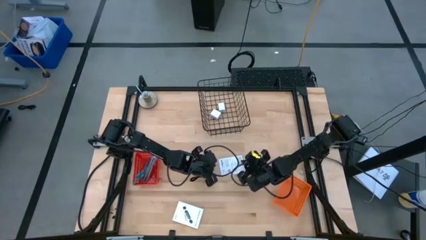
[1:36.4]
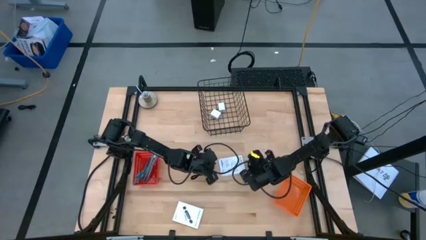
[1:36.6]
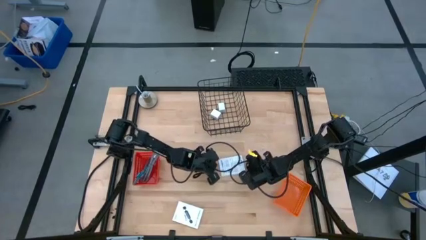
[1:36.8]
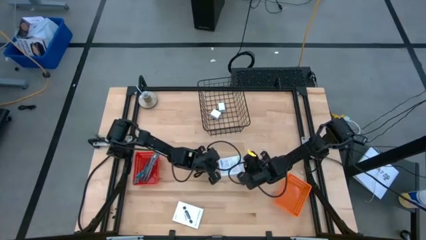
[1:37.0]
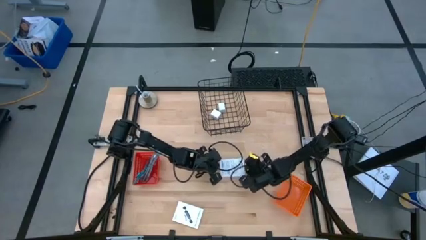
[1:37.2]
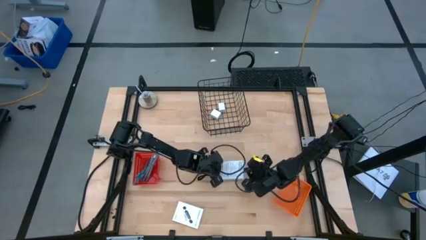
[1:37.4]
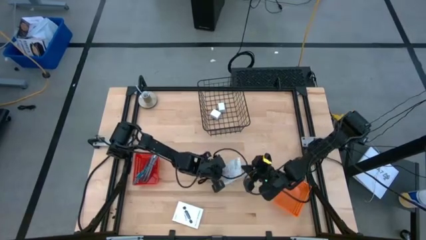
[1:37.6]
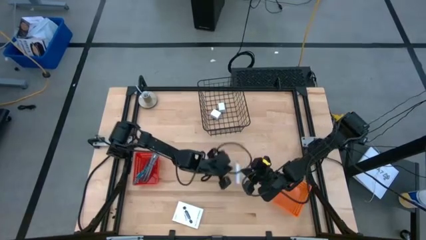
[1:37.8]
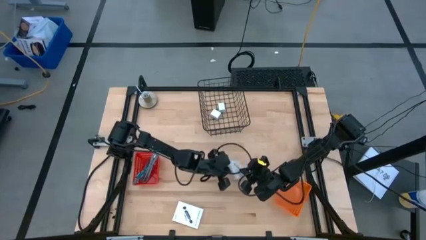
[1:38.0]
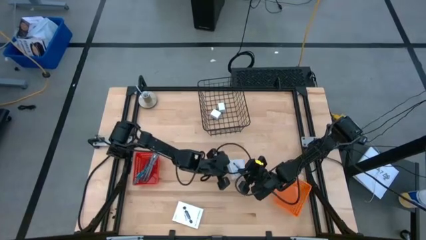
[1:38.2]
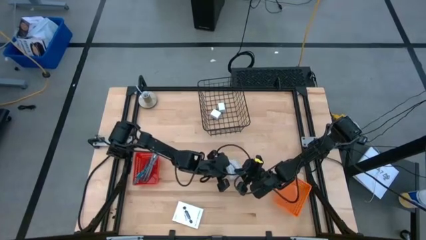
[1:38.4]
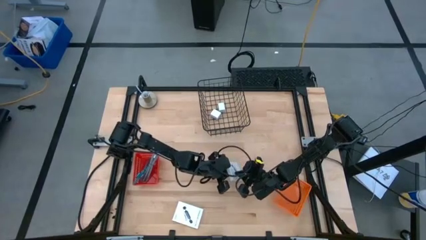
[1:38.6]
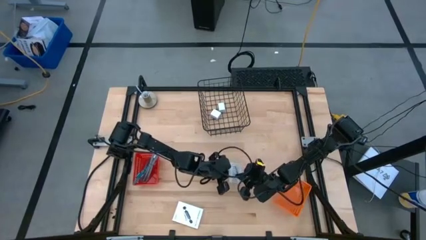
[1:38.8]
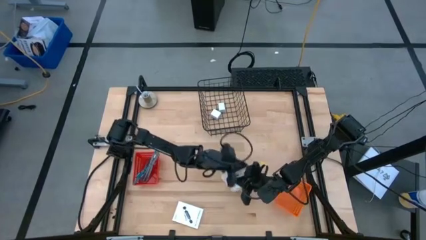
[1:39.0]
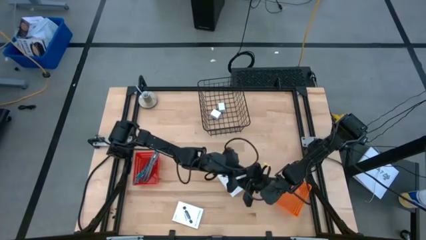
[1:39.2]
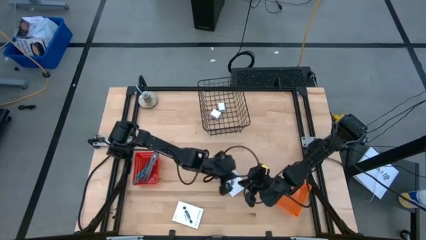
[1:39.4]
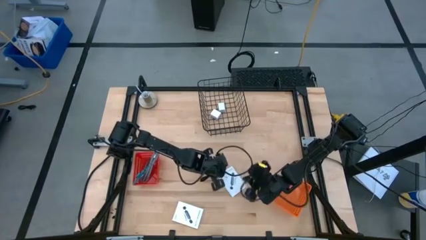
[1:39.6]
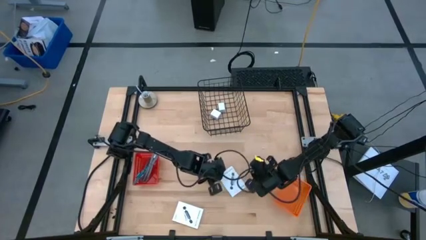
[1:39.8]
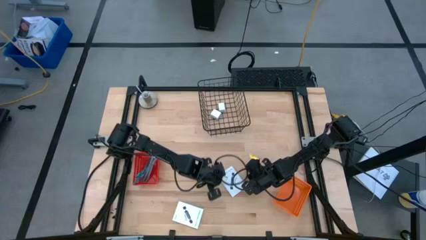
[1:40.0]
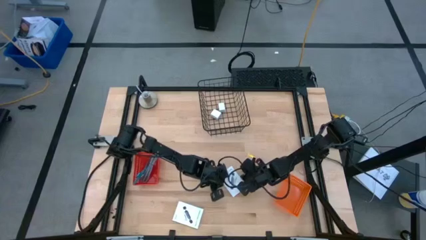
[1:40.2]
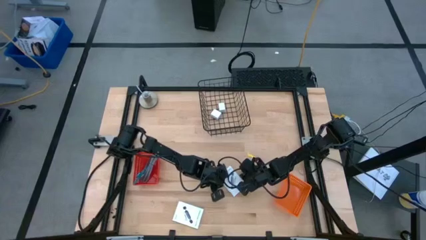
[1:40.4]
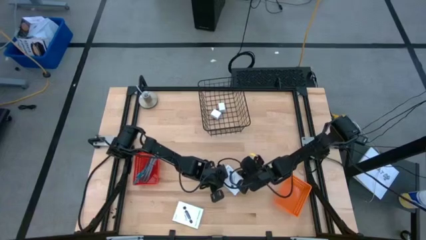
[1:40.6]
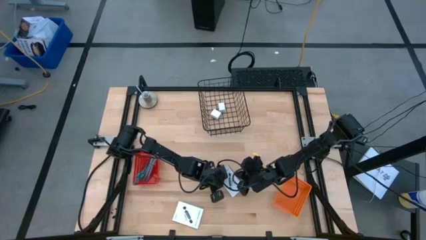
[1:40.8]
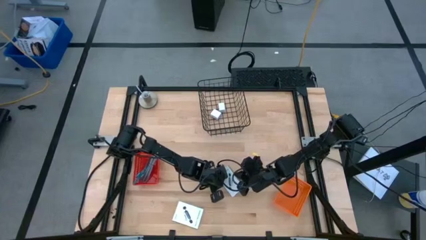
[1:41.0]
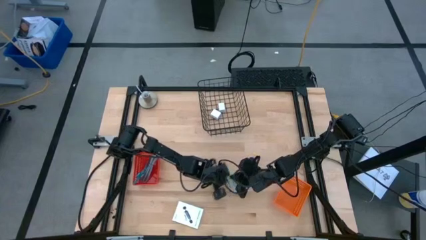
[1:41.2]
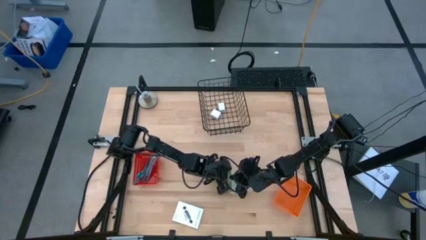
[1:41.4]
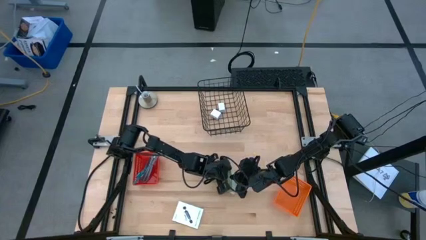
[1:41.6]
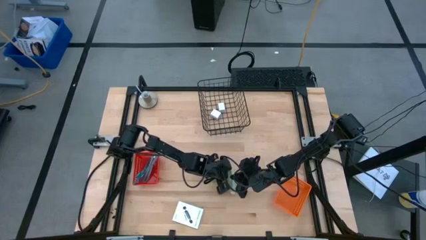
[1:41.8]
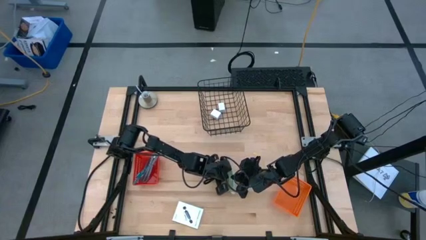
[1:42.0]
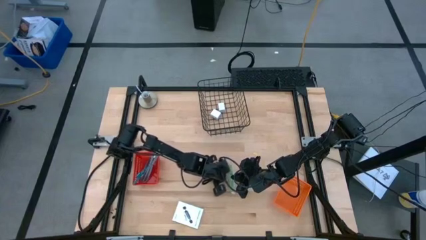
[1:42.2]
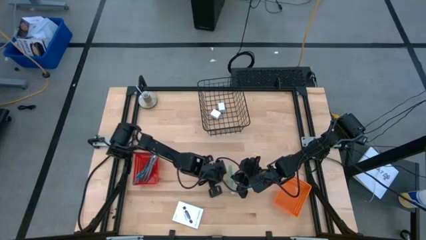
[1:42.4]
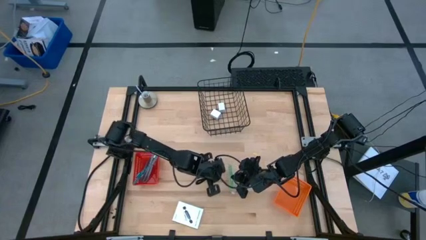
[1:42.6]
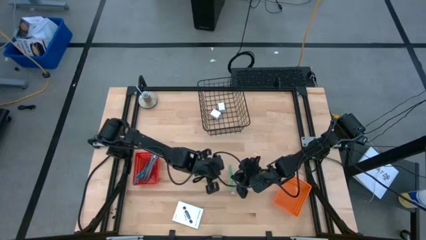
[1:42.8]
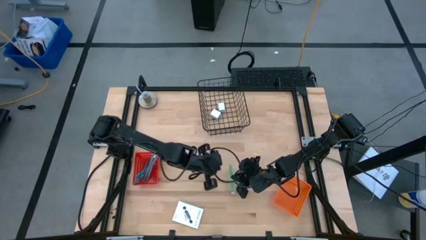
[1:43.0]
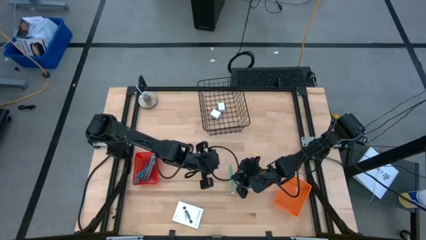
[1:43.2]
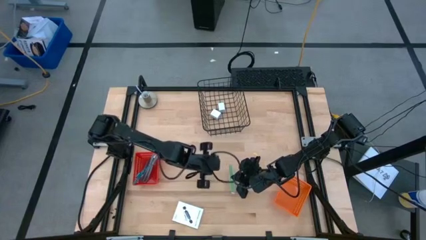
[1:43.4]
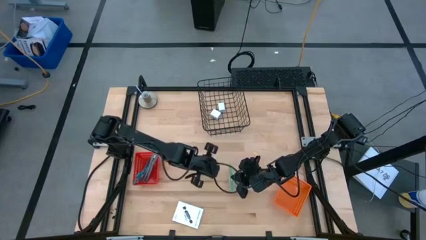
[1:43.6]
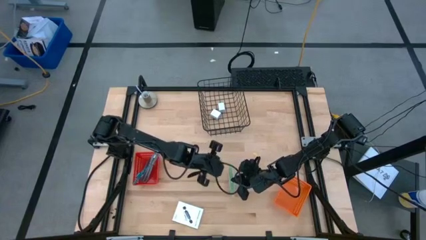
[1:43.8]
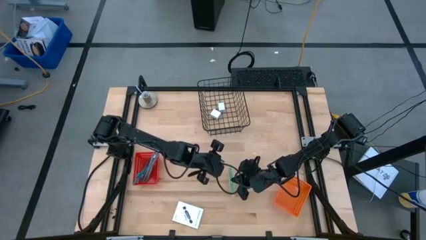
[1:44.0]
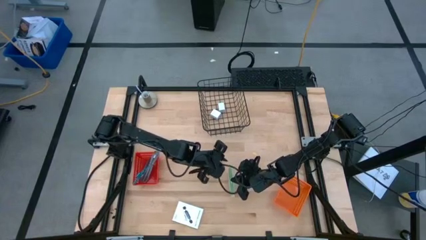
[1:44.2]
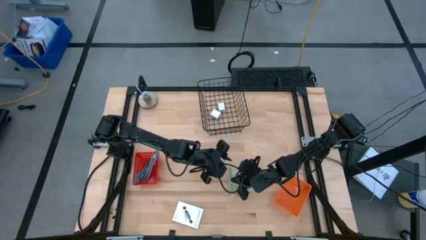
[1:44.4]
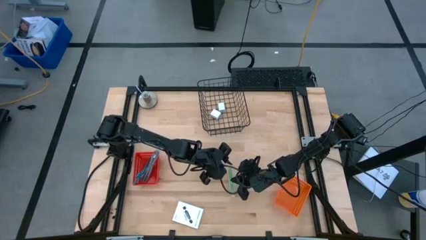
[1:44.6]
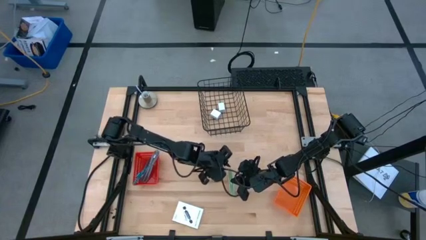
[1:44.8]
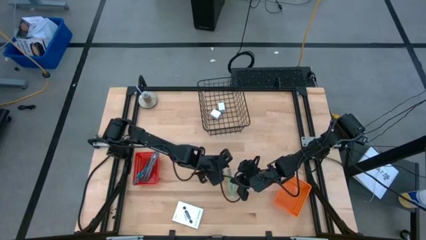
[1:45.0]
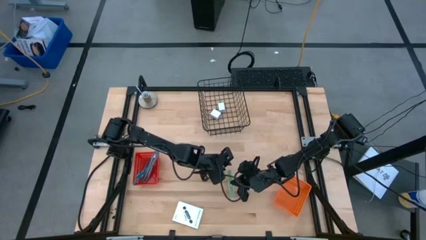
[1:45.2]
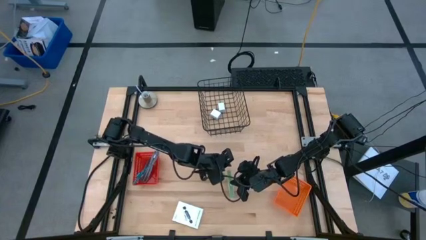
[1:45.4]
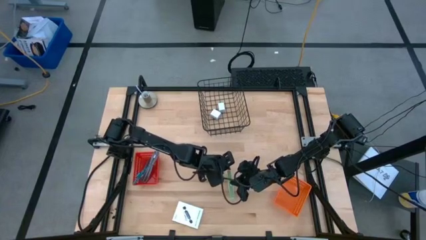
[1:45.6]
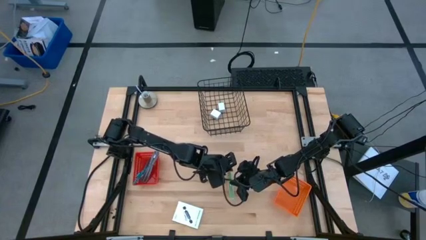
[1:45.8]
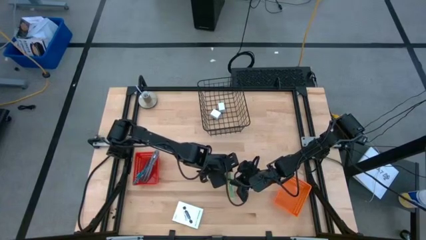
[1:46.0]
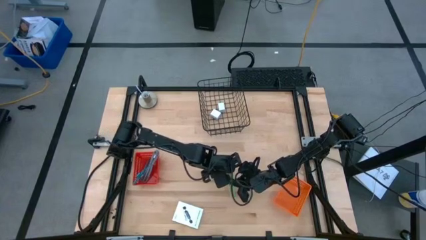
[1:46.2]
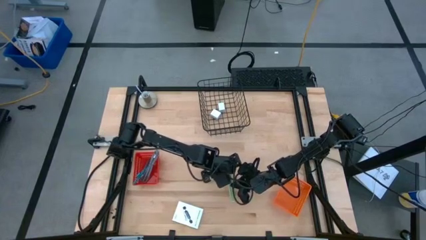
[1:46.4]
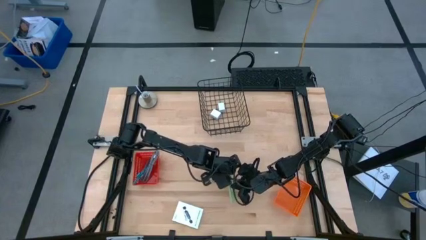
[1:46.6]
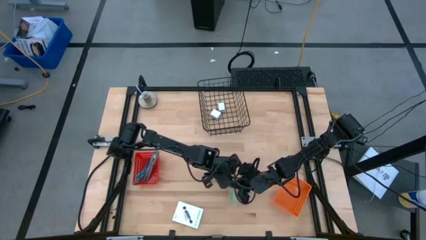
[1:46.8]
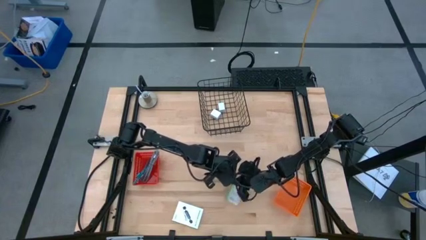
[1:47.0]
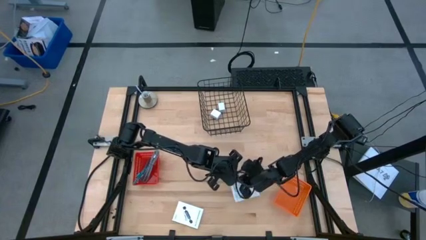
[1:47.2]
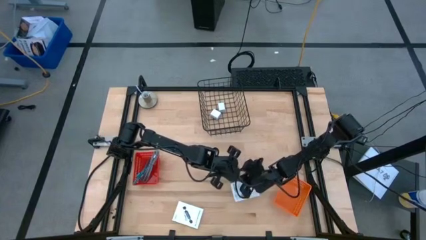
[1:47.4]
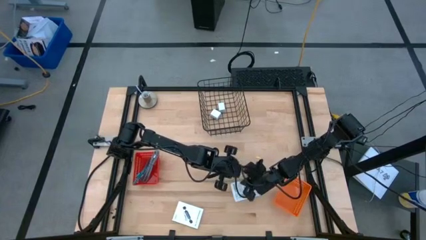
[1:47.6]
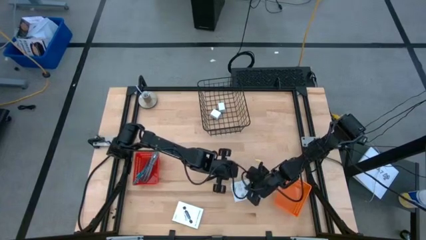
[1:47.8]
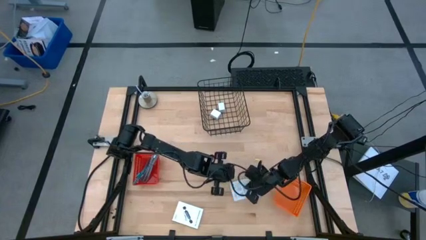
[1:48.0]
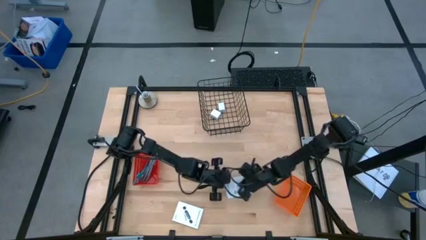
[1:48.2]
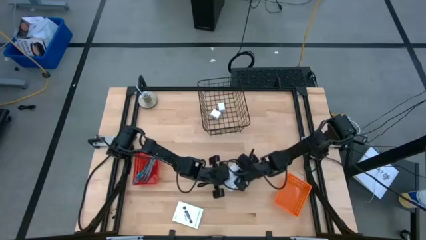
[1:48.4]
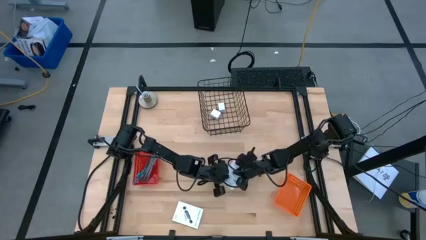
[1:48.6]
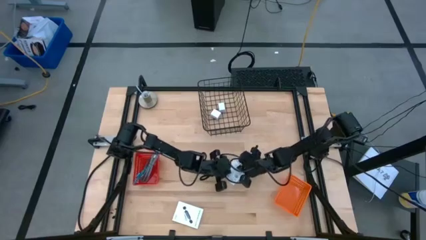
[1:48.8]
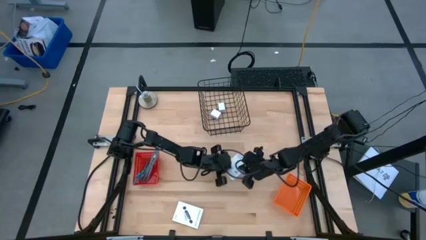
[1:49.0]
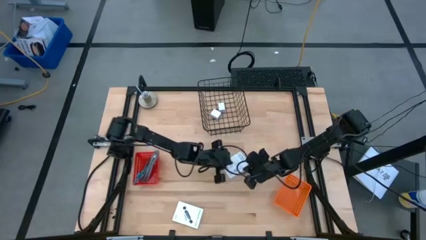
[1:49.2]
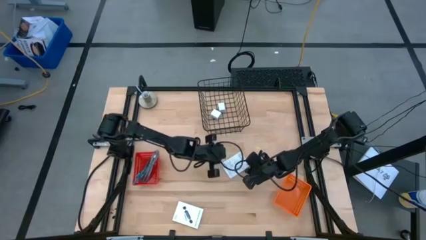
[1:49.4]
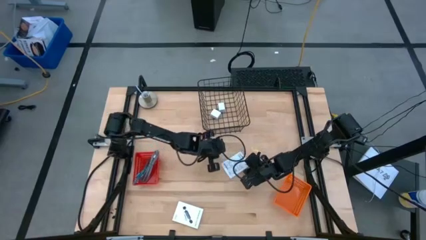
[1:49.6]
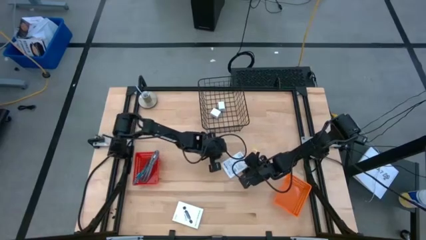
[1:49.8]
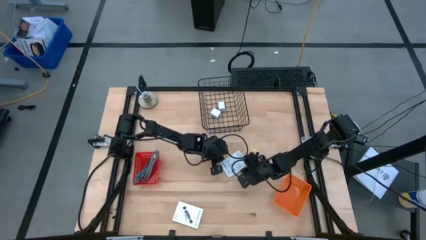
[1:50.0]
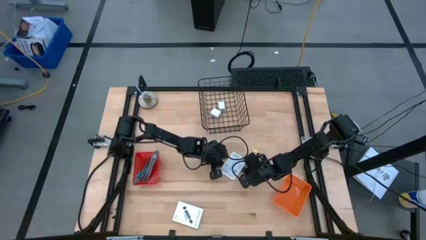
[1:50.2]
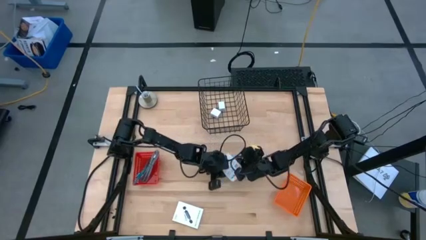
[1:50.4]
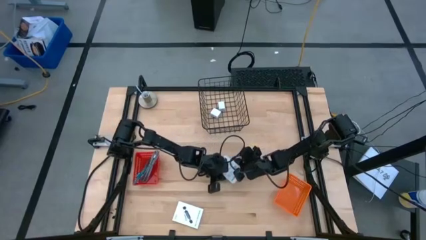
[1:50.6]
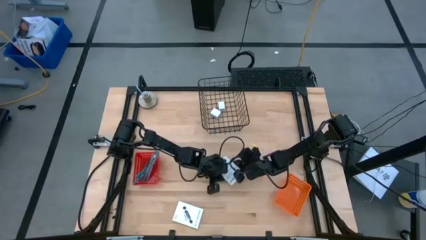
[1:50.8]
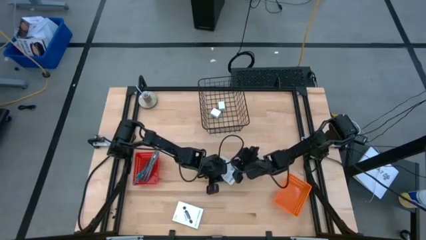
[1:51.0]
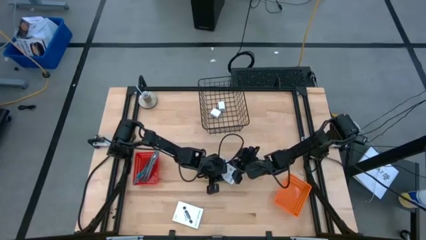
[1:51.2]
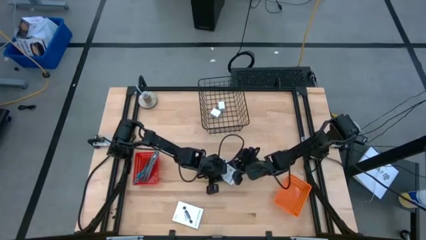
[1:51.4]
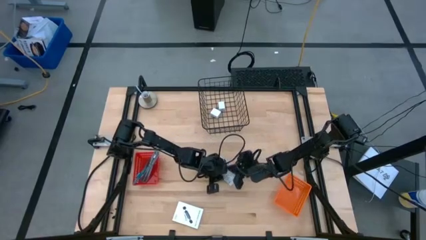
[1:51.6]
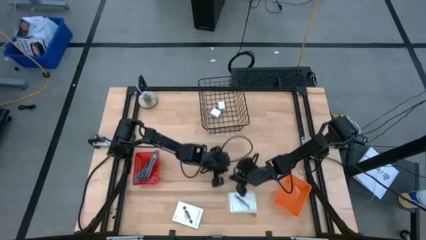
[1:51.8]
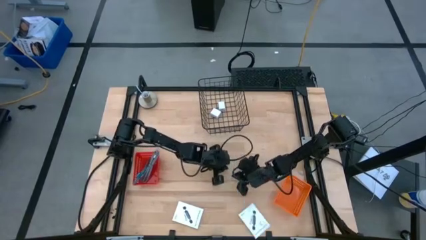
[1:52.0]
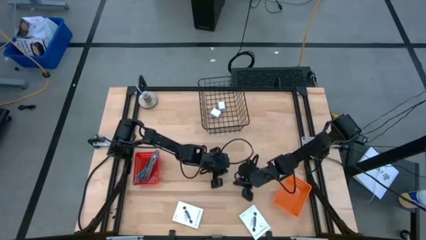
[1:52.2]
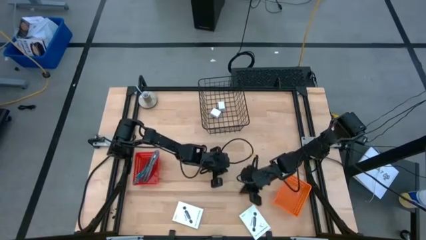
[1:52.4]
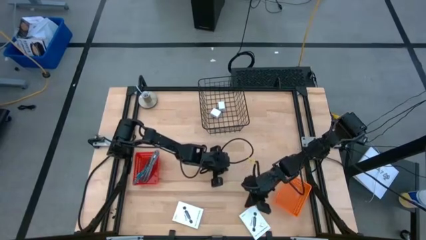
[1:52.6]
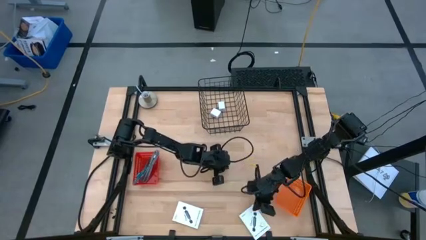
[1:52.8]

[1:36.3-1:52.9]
Task: Pick and place items into bin
Put the right card reader box into the orange basket
